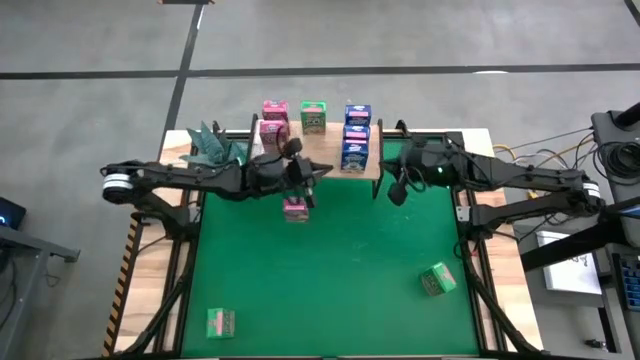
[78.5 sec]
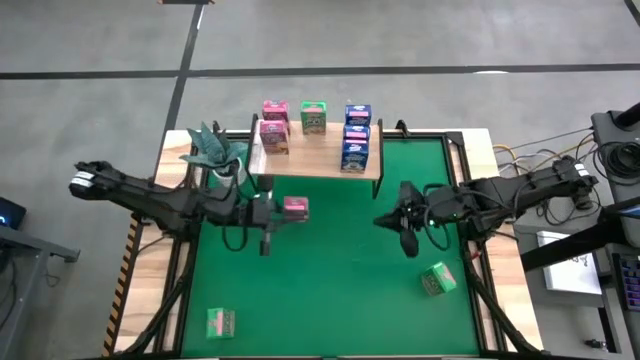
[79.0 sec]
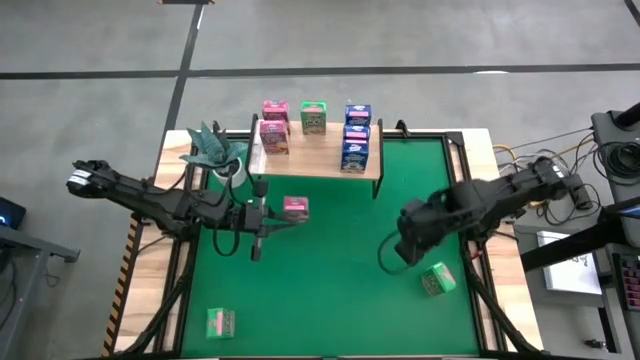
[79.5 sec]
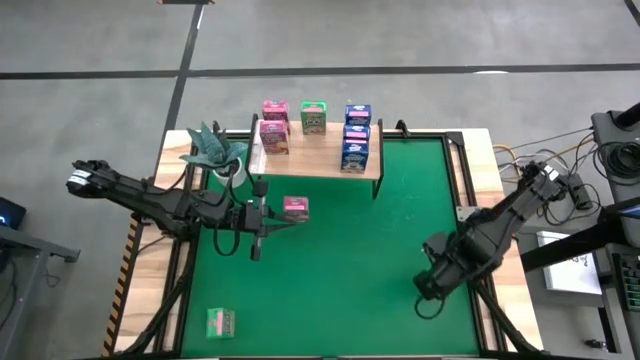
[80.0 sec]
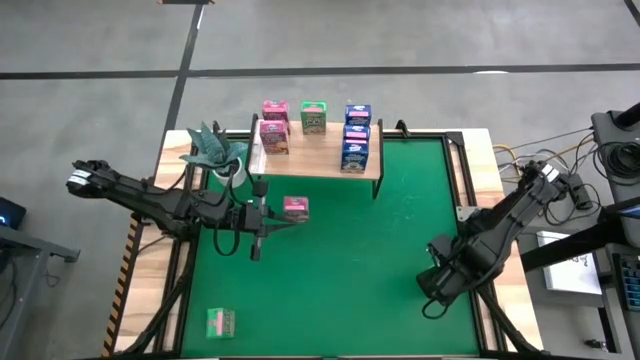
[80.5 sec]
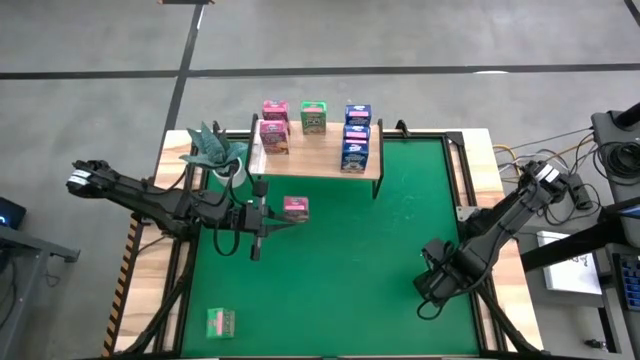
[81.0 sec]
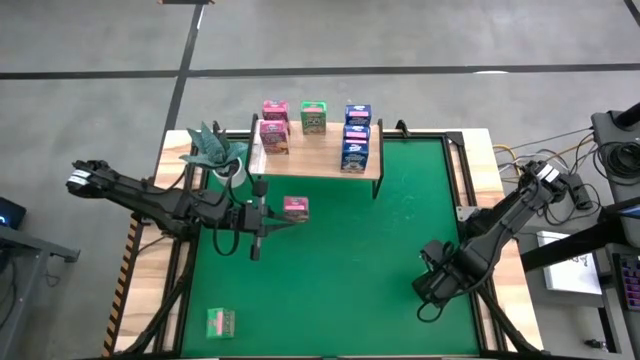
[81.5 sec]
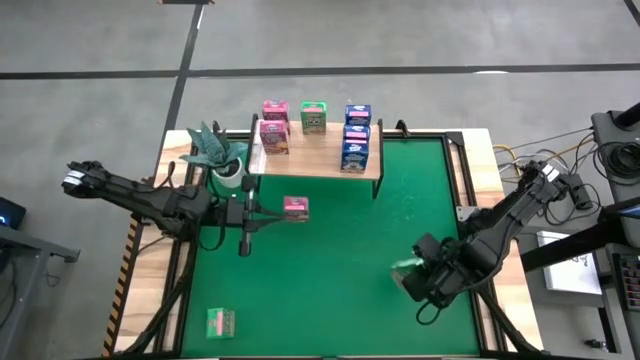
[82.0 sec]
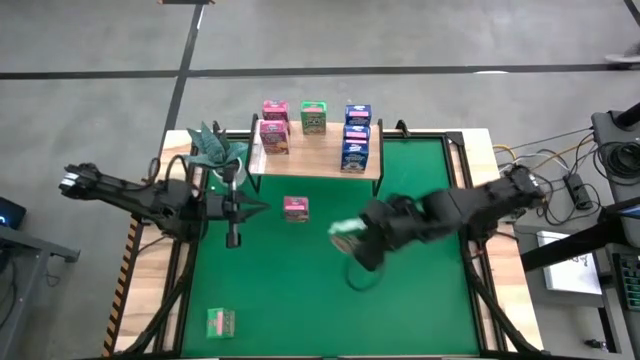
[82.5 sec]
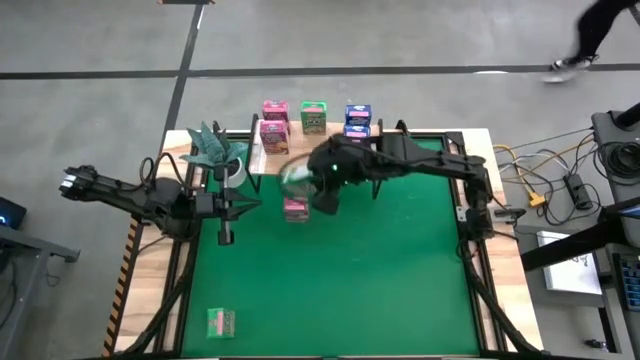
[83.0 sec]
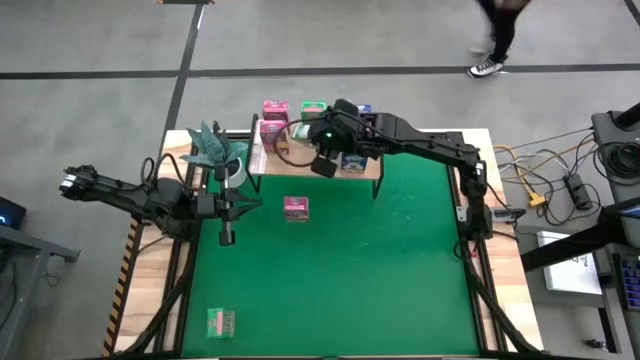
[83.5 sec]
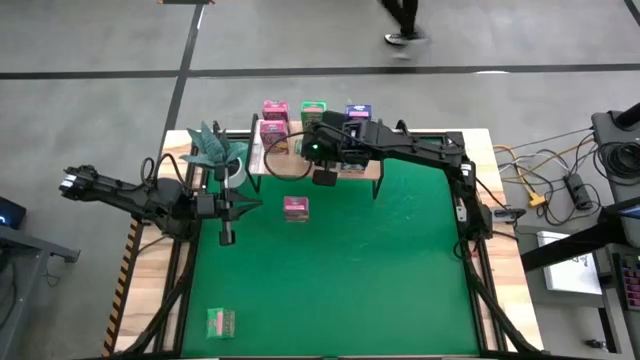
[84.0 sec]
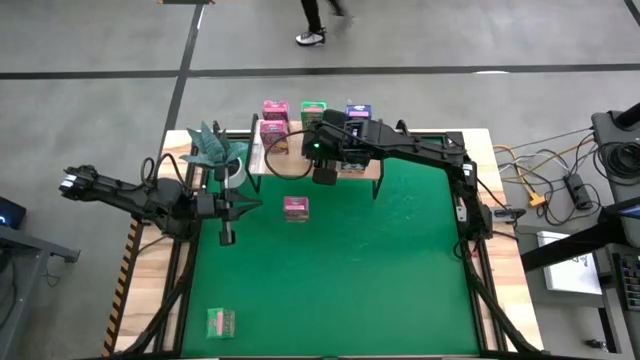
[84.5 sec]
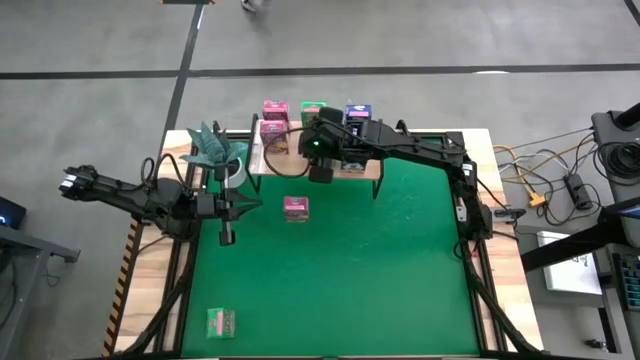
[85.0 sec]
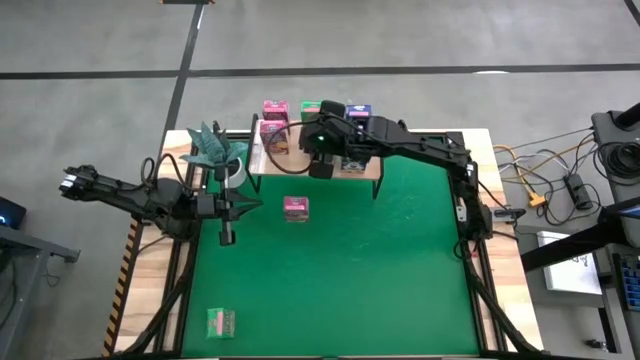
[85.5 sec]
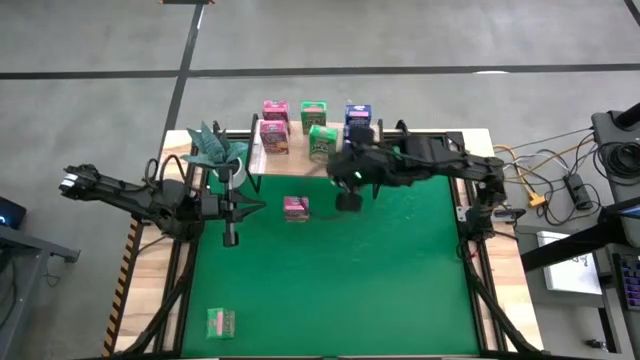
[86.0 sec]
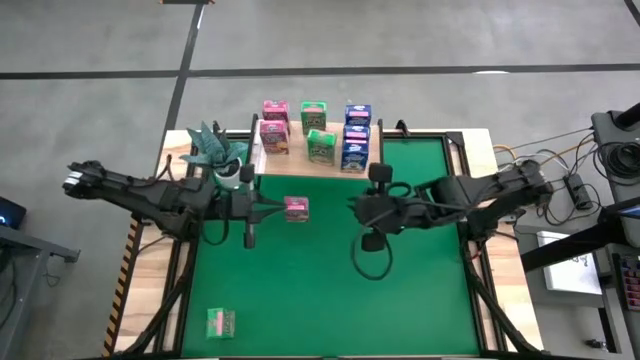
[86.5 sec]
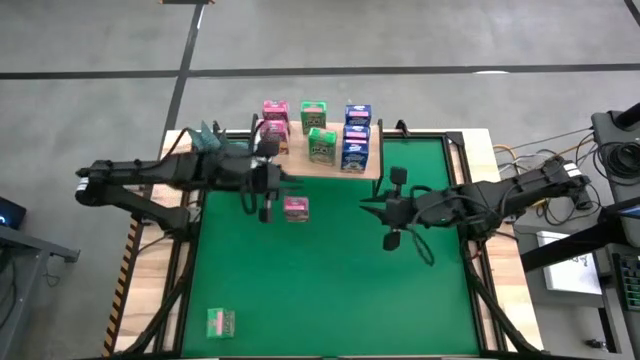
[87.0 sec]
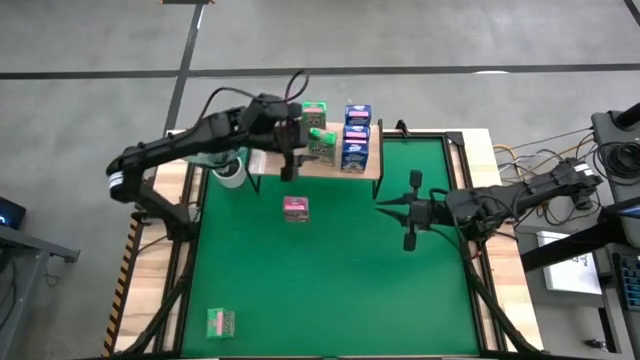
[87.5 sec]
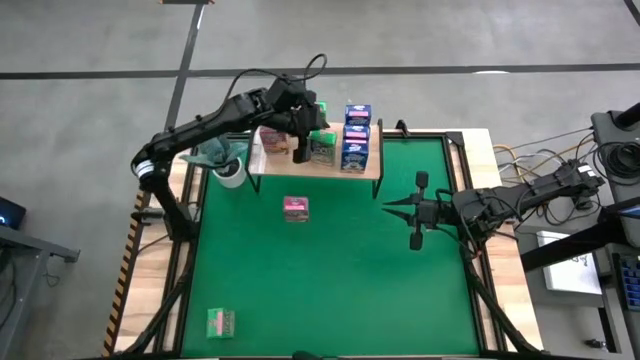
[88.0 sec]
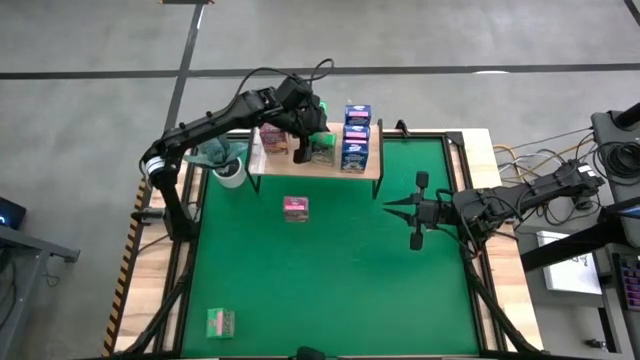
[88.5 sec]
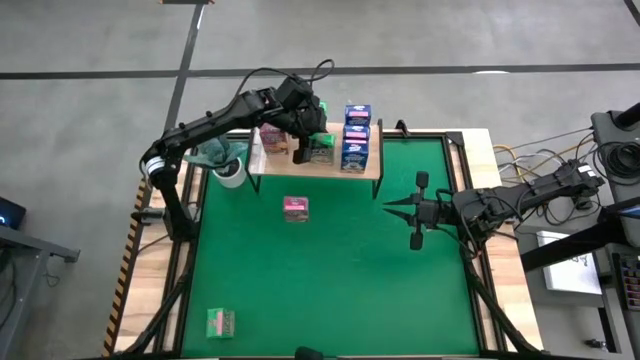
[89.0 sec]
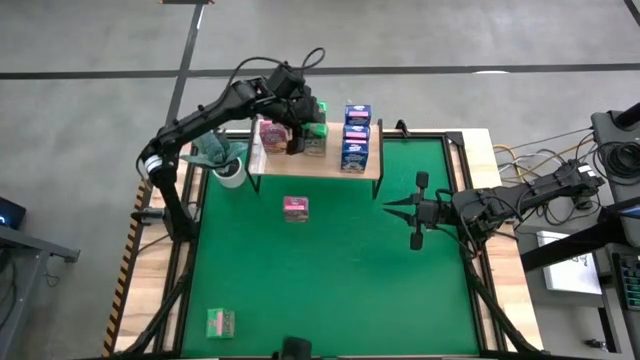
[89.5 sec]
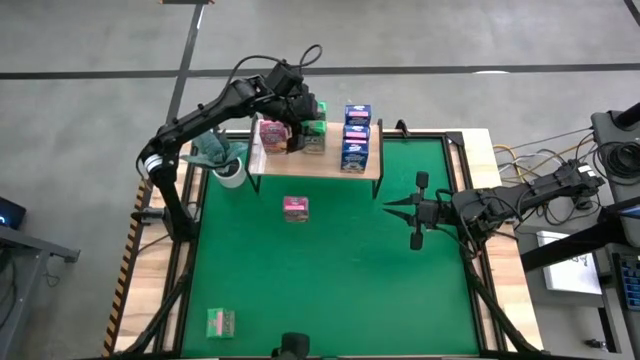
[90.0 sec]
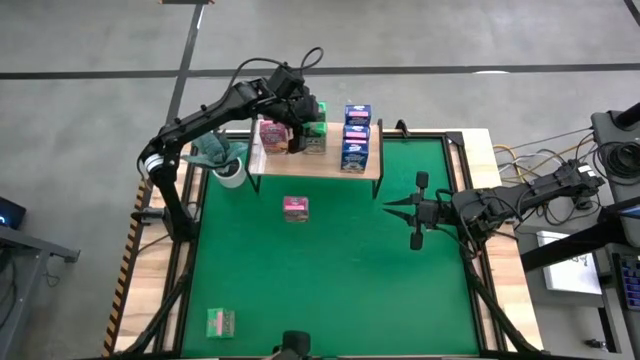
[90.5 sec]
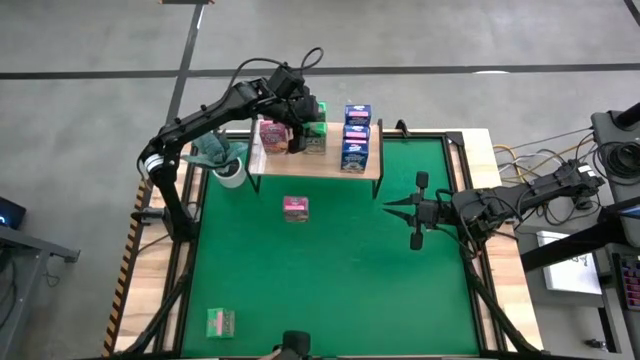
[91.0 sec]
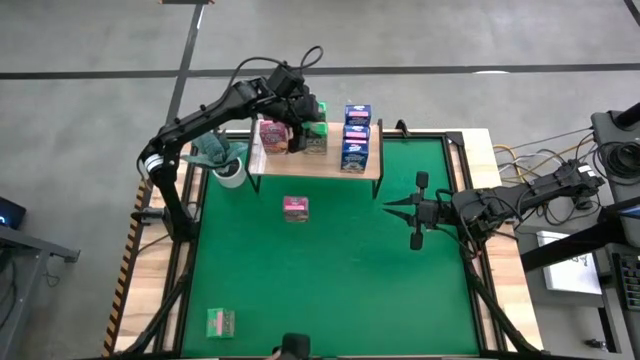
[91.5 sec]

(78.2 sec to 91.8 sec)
Task: Stack cereal on shelf
Put the right green cereal box on the shelf aligned with the other green cereal box

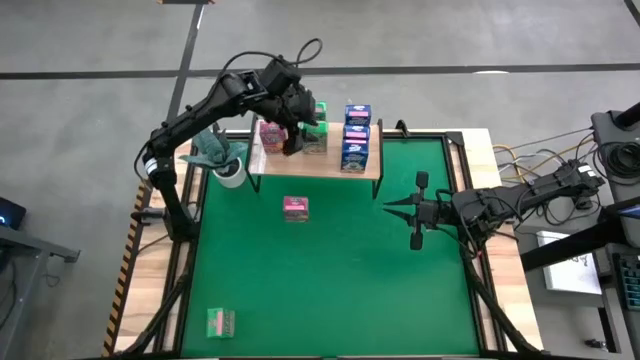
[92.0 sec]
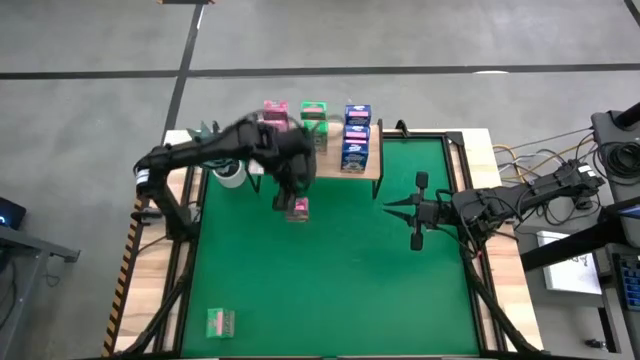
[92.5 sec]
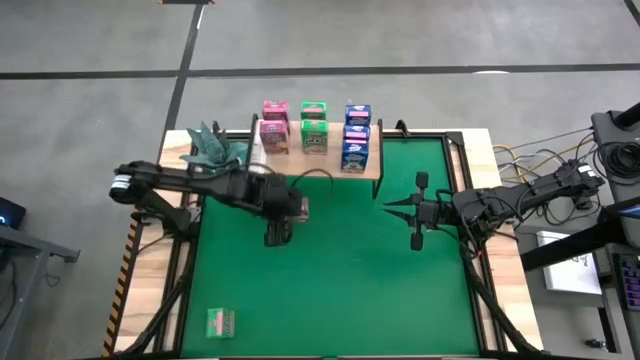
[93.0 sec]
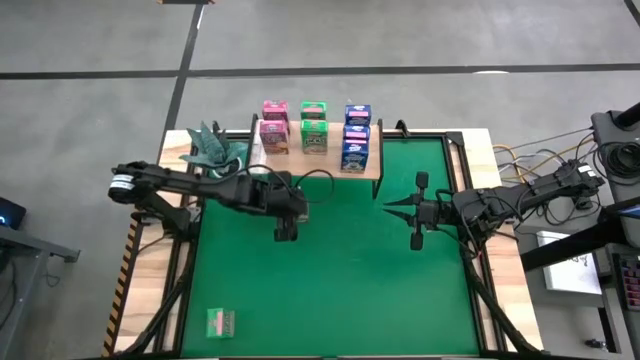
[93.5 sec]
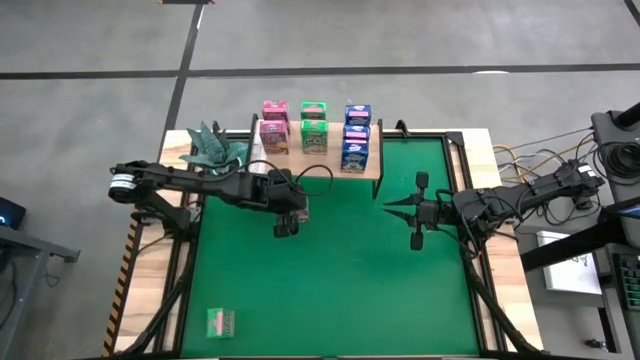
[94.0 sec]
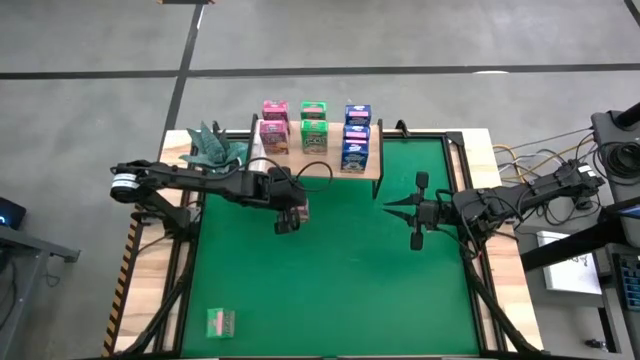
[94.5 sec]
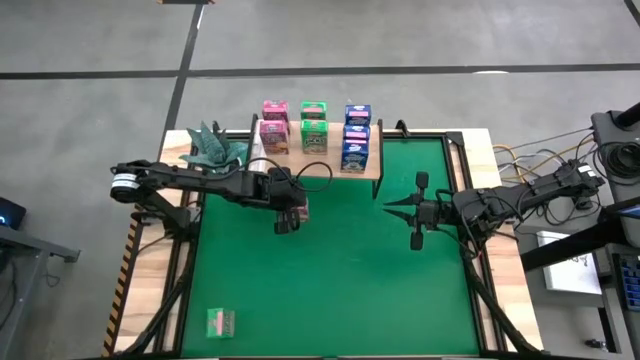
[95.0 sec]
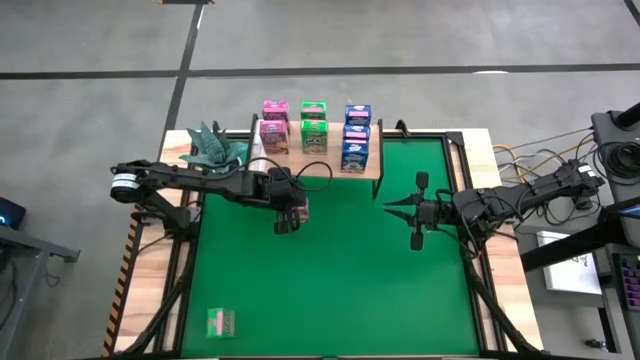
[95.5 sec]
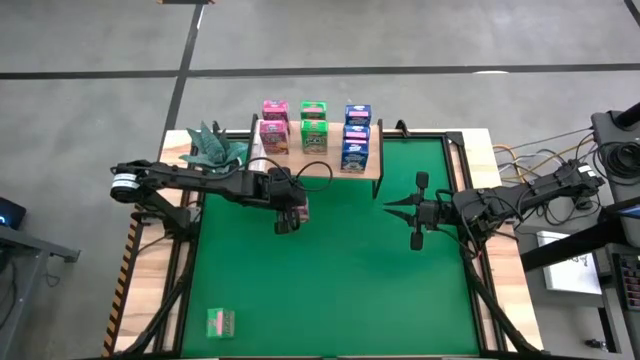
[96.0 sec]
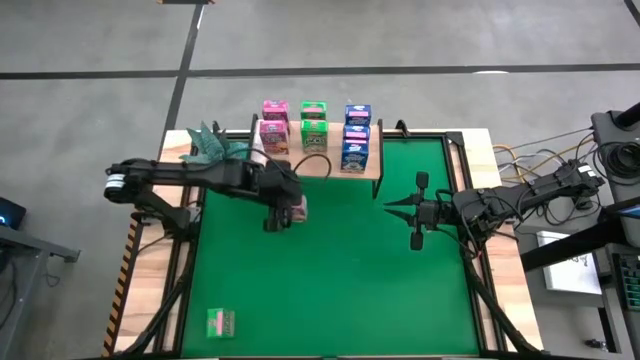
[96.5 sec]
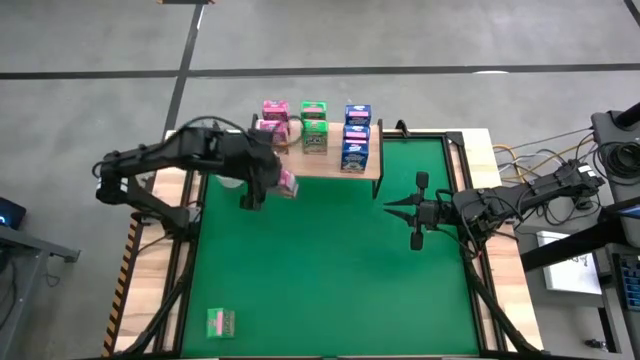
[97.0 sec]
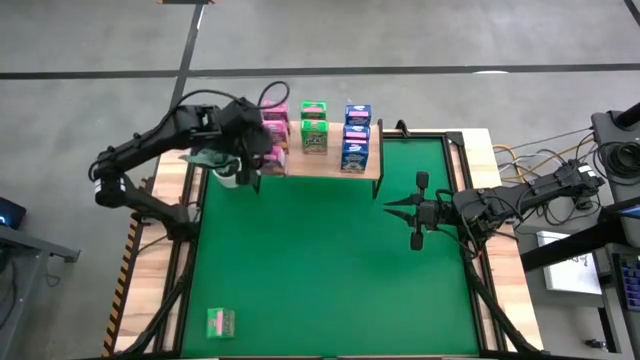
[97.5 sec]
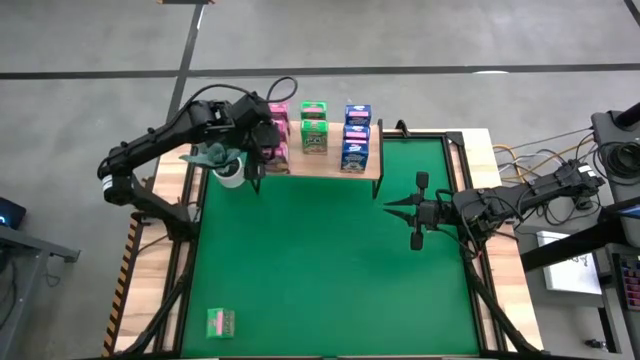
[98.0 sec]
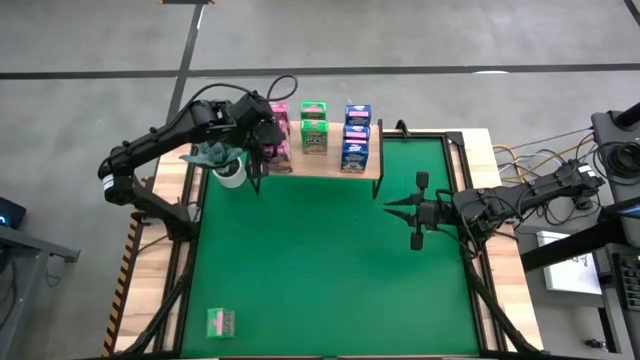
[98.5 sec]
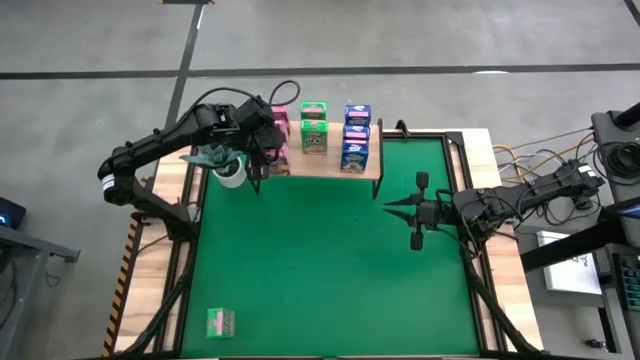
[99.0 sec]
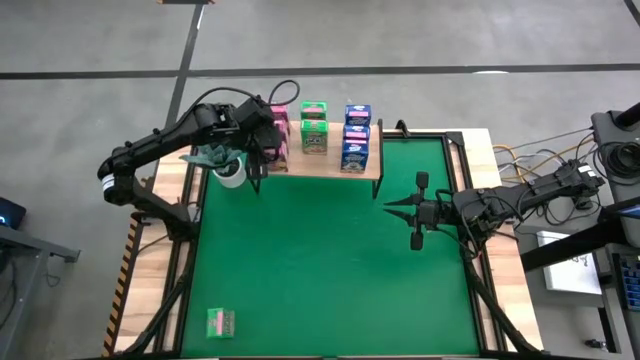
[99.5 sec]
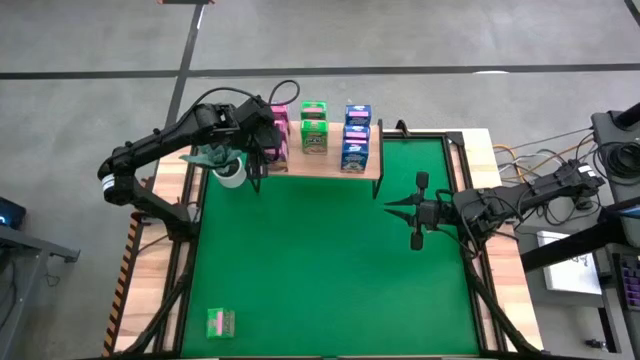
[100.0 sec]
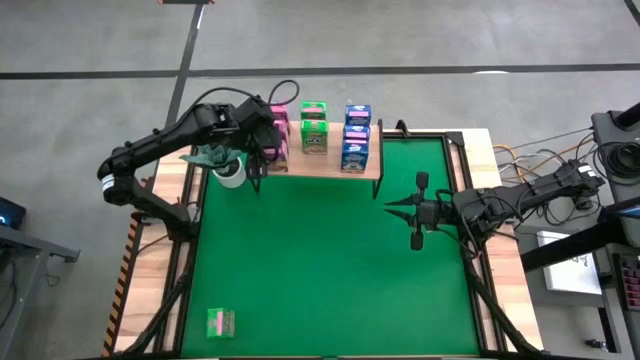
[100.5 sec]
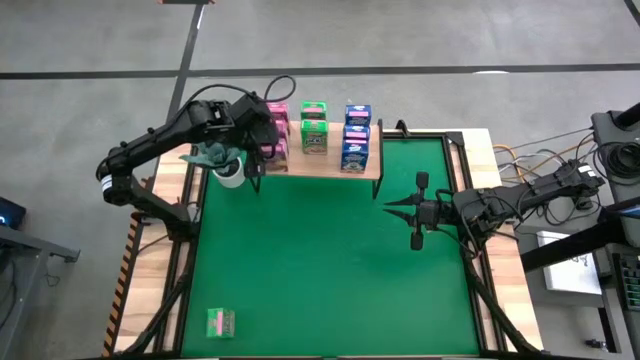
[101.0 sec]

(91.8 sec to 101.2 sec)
Put the pink cereal box on the shelf aligned with the other pink cereal boxes
